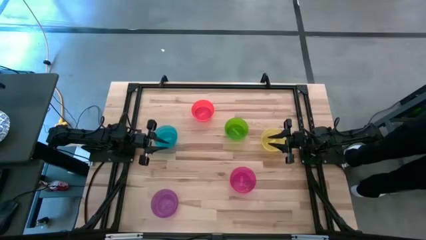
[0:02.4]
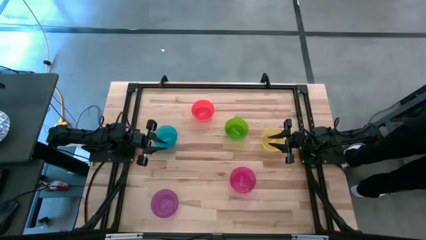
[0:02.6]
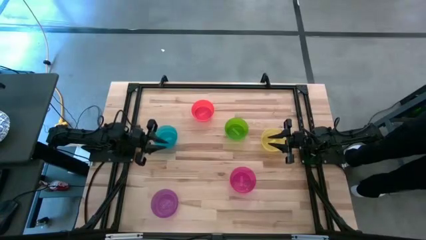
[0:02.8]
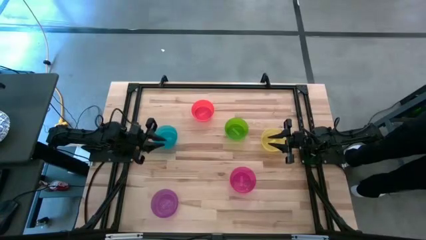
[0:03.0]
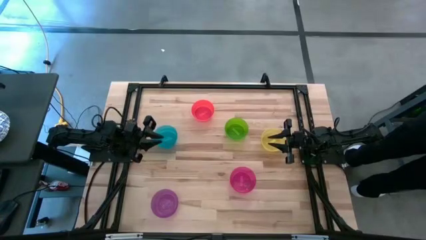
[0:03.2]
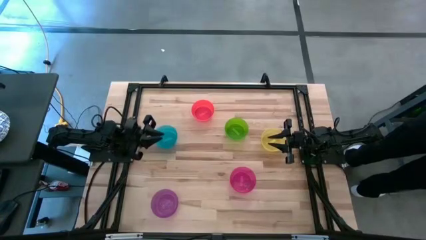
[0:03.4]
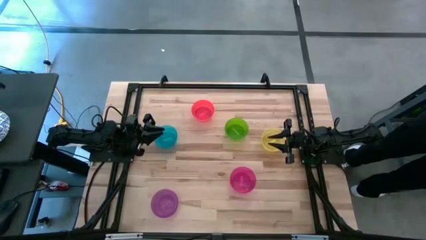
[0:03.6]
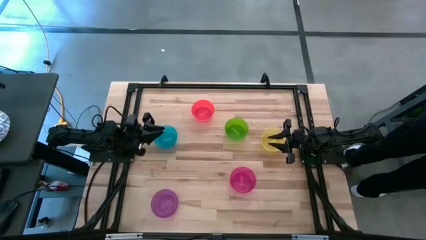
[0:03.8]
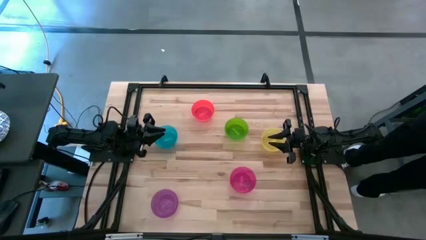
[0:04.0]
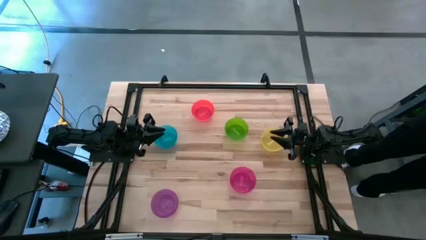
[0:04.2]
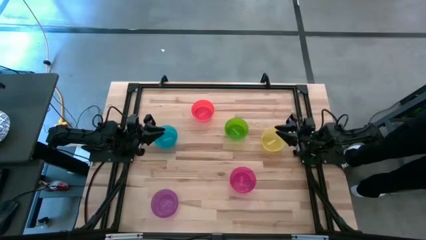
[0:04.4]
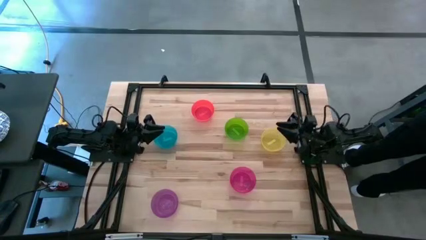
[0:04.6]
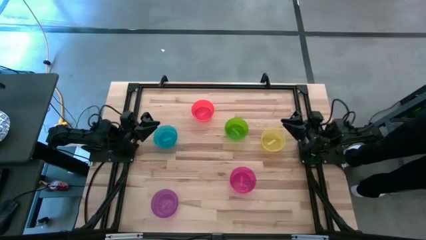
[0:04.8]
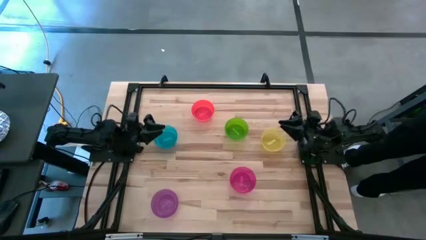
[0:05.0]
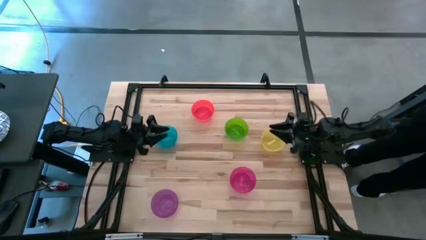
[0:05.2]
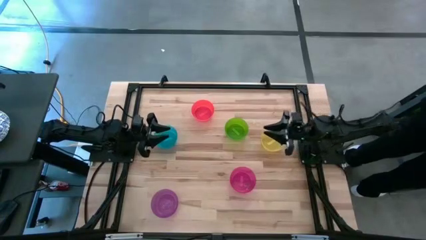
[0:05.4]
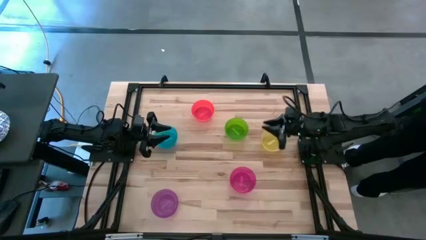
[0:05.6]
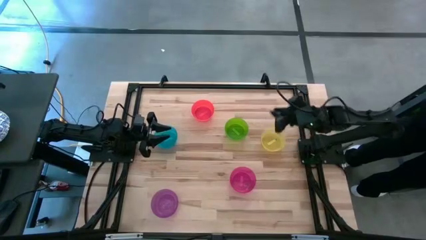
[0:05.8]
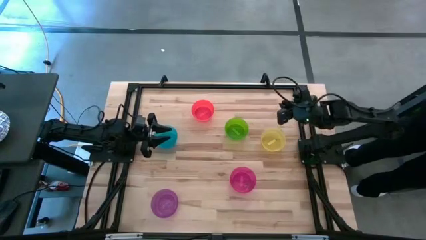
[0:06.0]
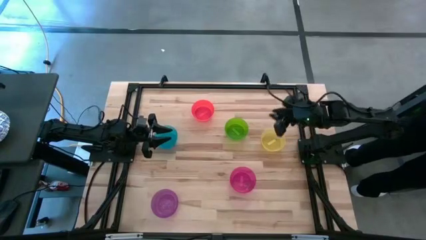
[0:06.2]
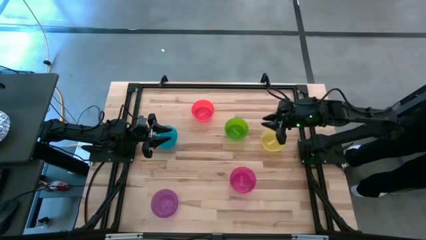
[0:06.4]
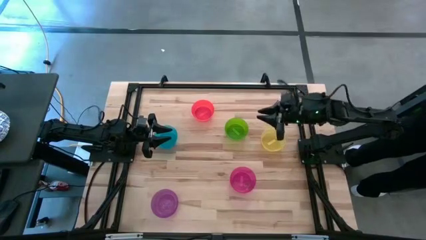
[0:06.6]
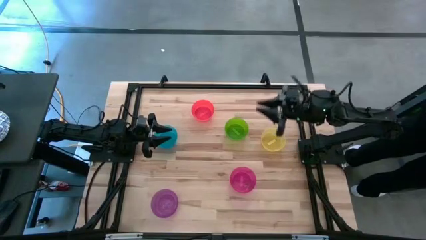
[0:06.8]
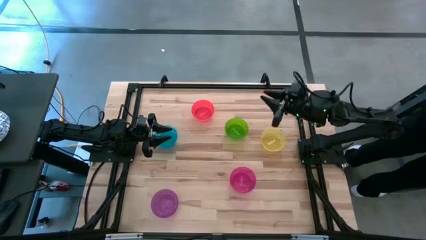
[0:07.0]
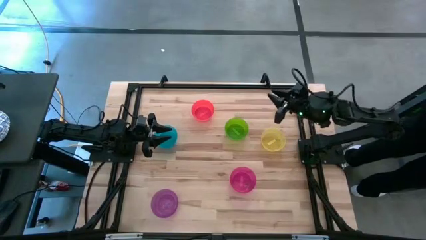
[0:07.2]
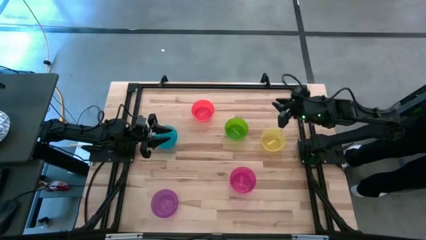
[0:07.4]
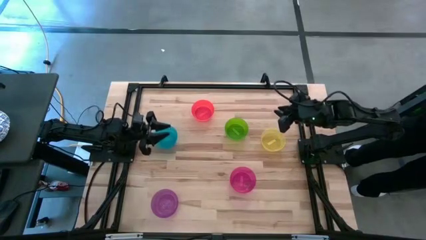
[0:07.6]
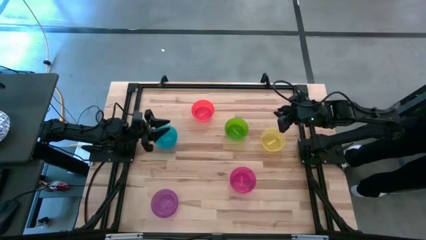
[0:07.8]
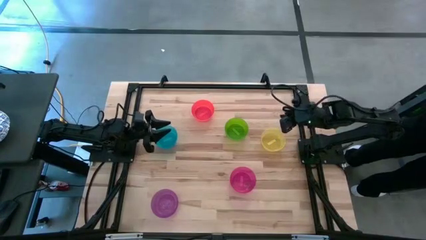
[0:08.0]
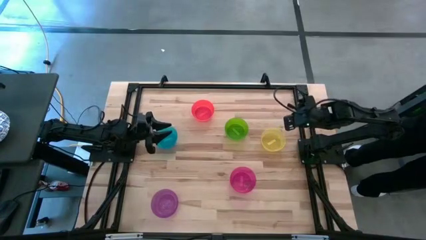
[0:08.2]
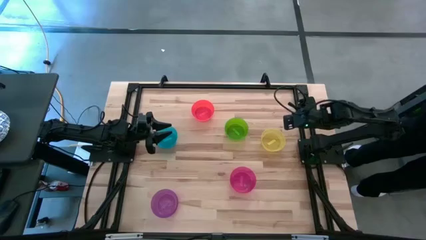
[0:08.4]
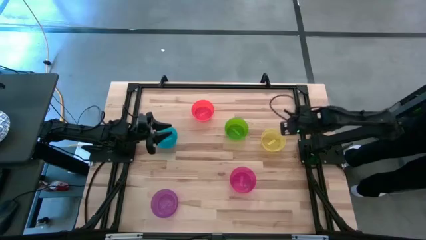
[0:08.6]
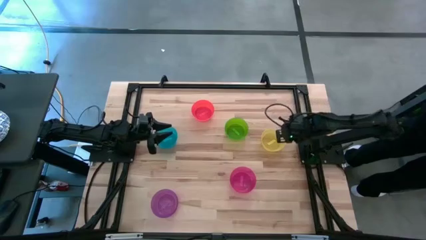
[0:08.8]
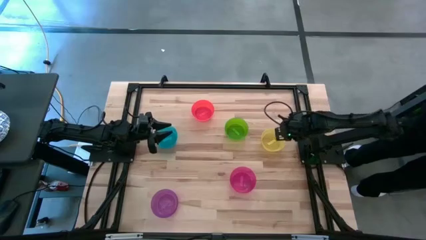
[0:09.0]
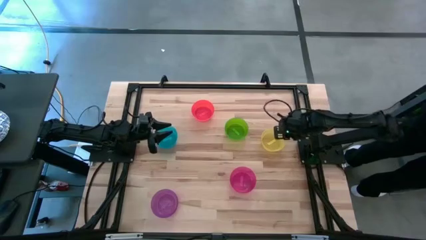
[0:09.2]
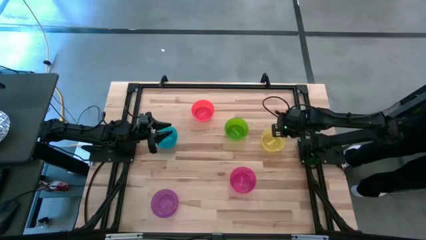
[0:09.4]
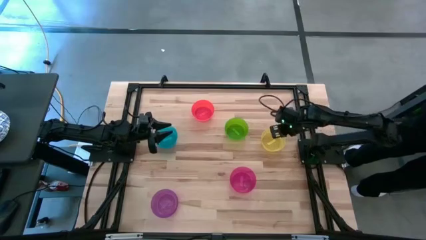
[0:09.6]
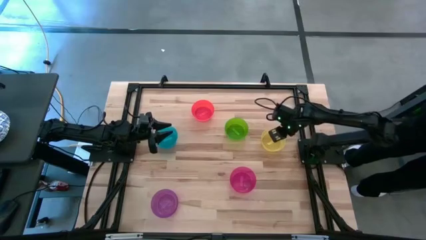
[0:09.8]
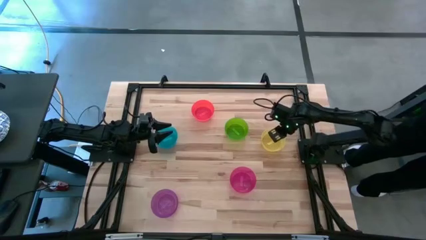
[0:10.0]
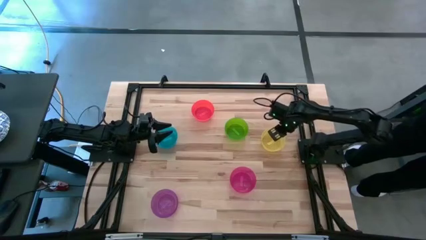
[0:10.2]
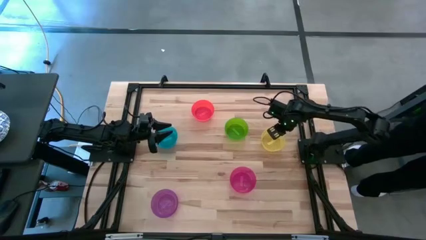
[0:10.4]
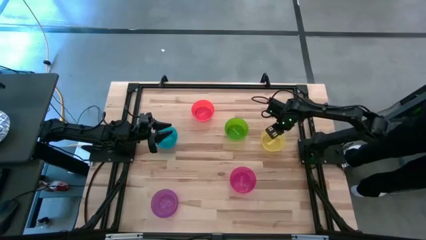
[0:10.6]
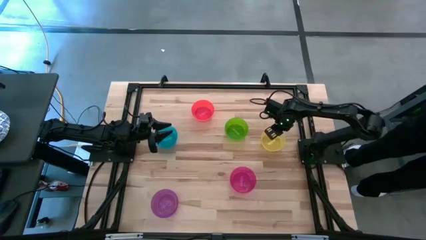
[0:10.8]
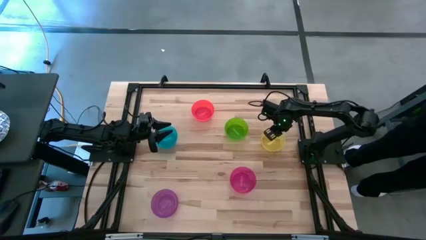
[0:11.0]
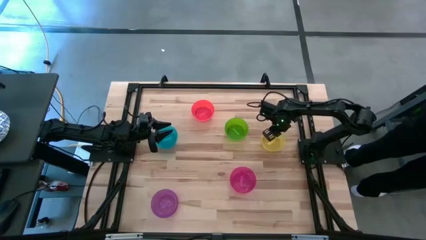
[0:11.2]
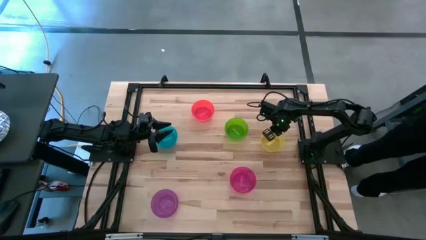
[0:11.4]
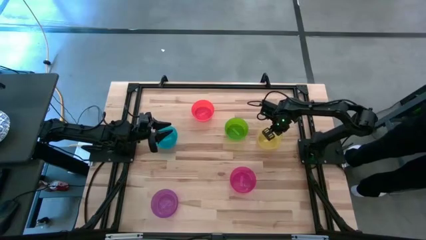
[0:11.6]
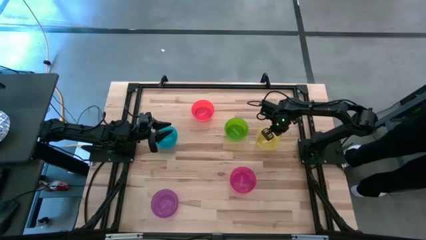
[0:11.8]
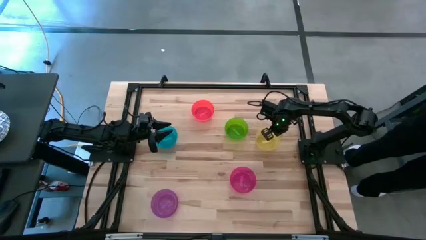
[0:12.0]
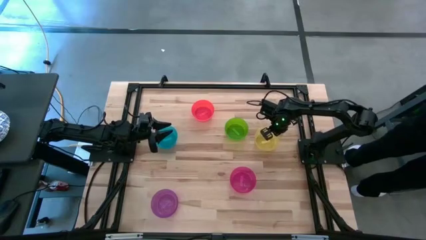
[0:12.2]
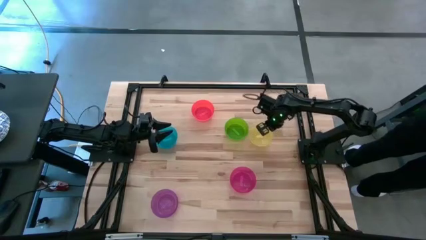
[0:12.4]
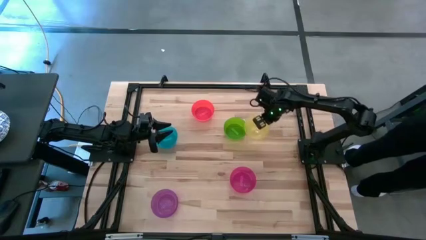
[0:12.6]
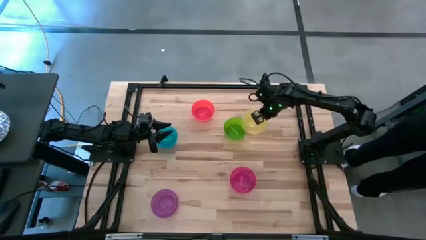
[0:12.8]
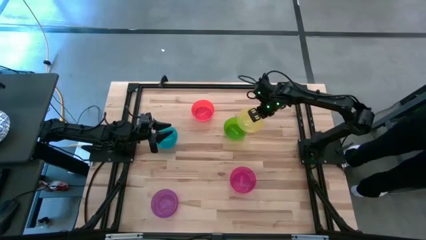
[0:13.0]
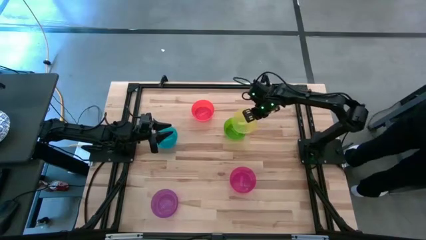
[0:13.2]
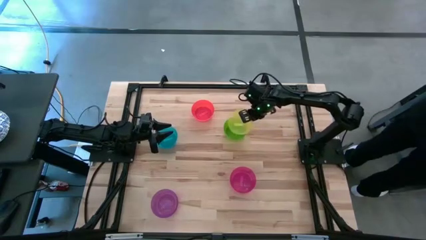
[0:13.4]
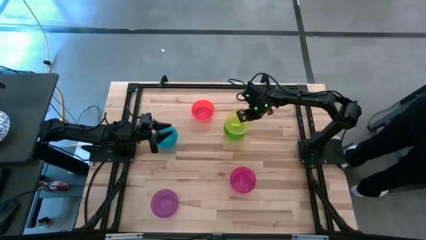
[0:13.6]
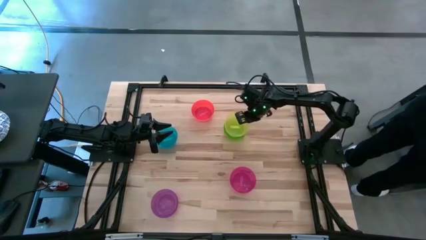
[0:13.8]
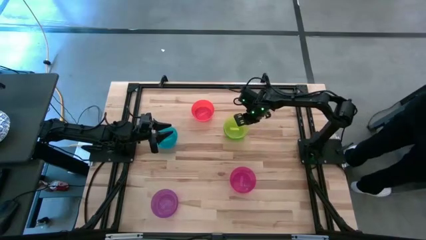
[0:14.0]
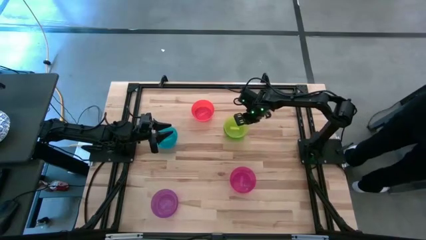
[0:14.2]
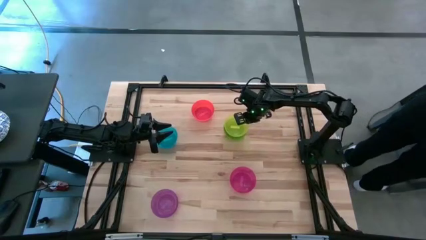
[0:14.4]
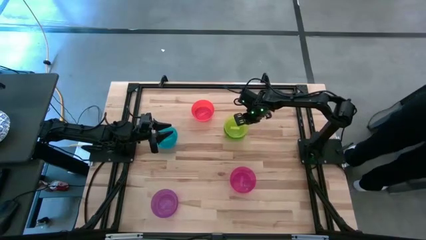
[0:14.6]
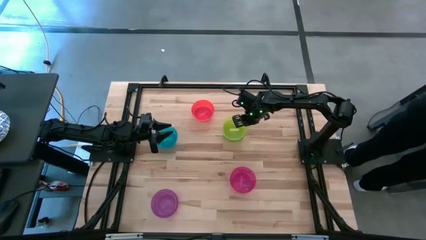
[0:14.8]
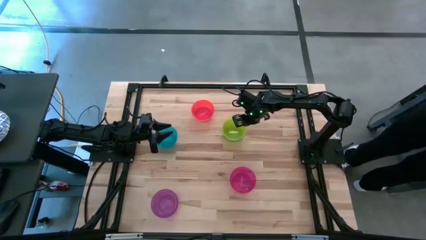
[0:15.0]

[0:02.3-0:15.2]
Task: Nest bowls inside each other
Stack the yellow bowl on top of the green bowl

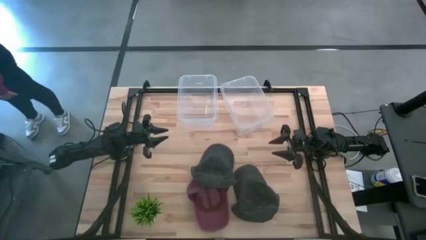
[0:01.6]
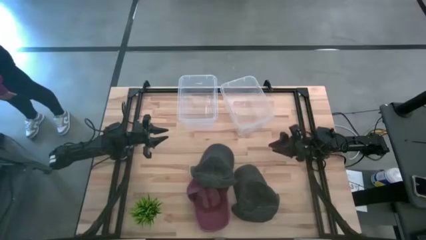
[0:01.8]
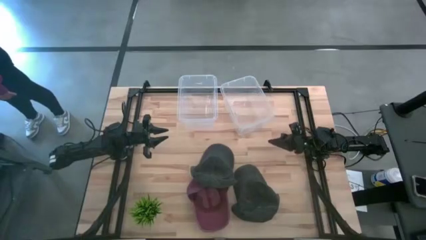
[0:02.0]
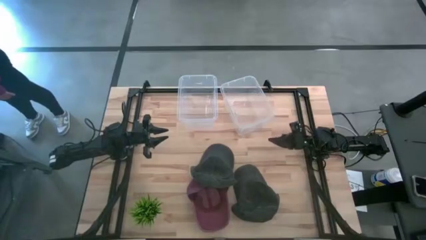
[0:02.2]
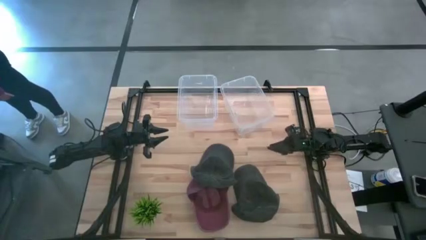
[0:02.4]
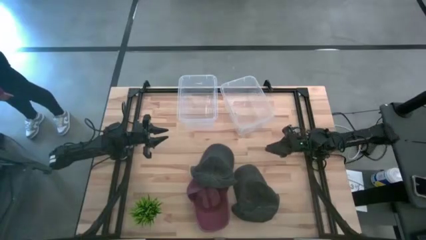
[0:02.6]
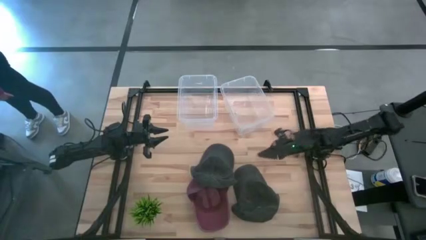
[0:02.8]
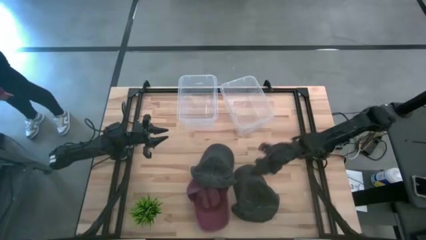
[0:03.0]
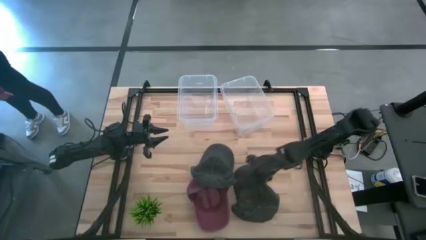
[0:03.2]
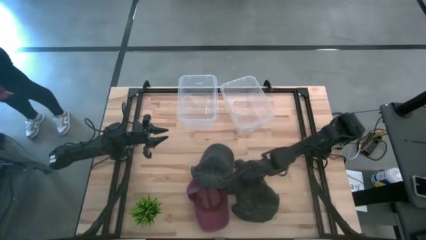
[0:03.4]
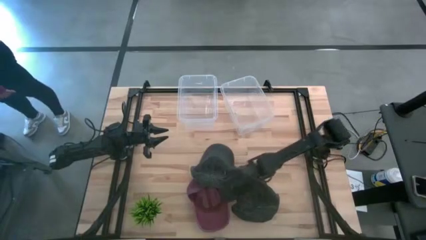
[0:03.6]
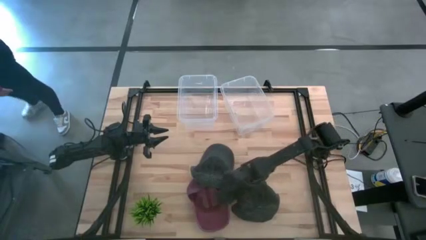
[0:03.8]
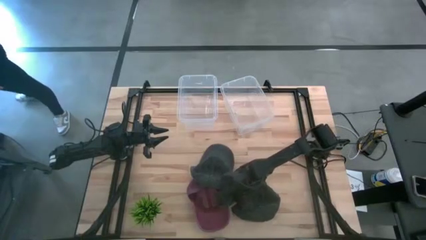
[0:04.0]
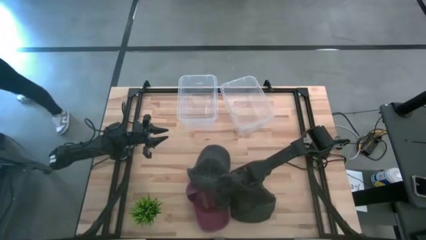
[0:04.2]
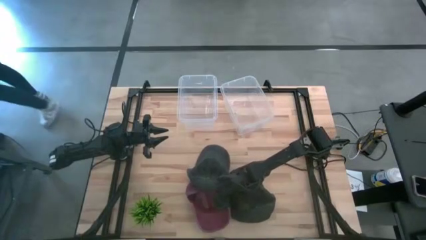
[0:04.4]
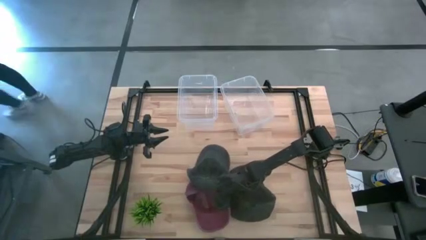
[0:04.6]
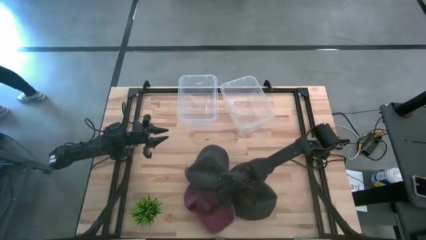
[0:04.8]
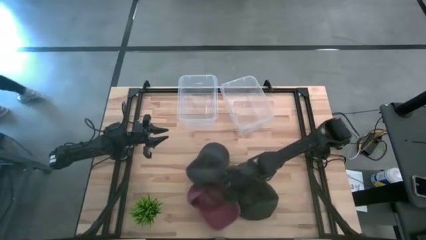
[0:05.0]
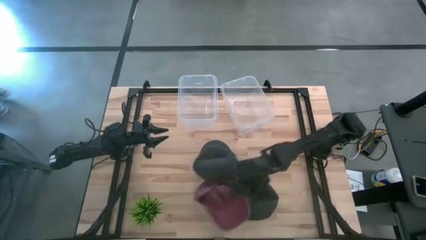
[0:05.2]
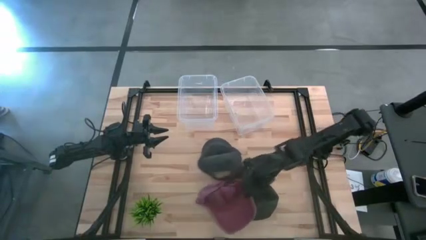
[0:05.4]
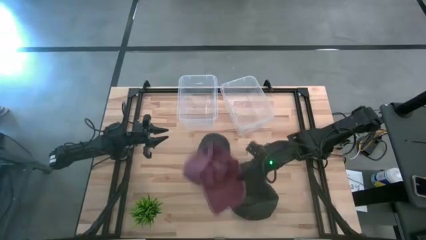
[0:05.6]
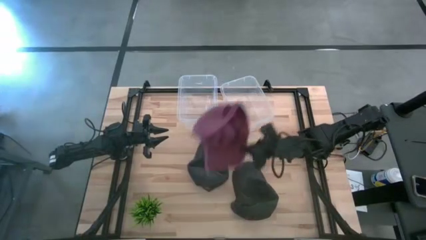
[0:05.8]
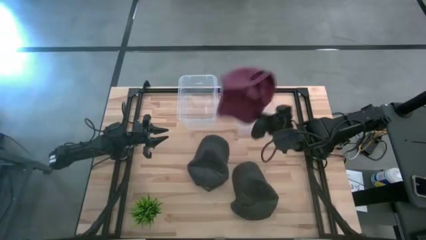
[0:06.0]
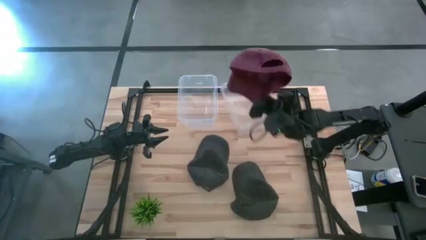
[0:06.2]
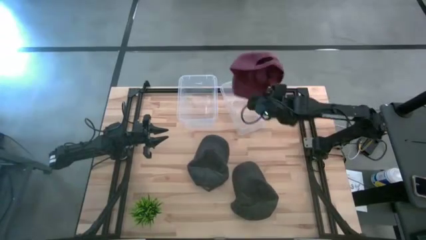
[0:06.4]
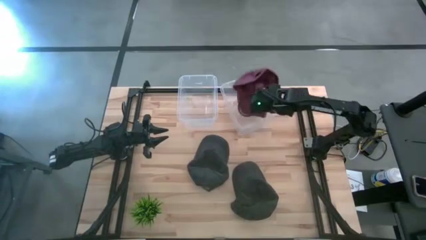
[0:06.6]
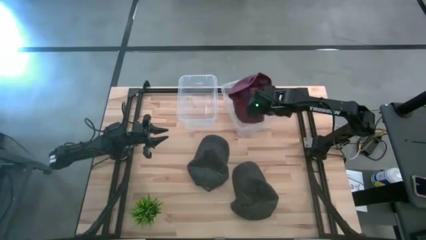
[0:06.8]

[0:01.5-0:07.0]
Task: Pick & Place hat
Put the red cap in the right transparent bin
